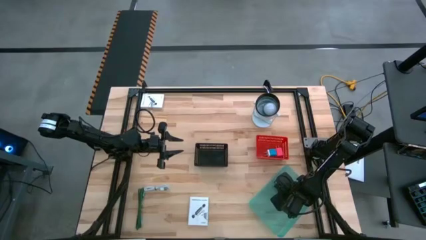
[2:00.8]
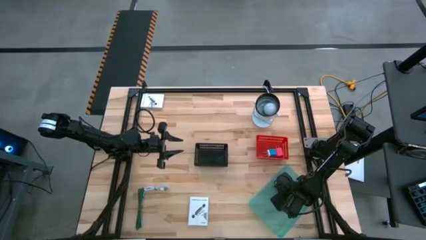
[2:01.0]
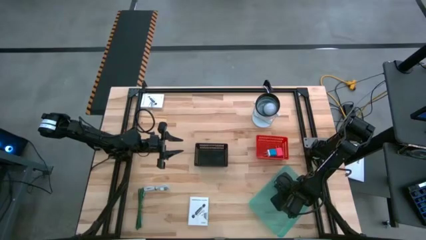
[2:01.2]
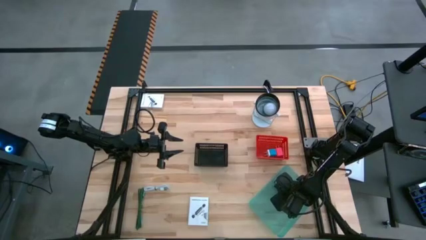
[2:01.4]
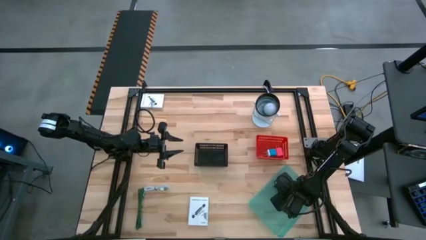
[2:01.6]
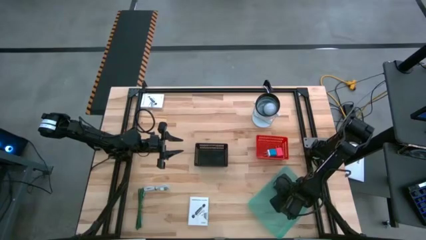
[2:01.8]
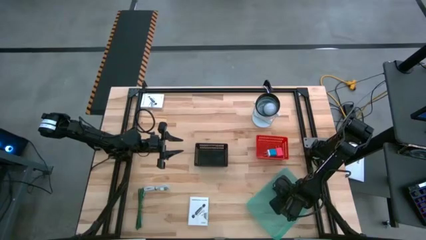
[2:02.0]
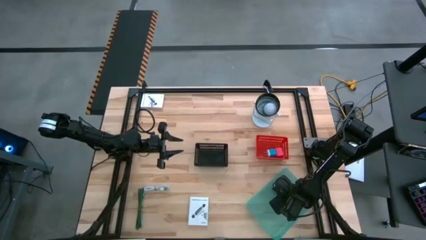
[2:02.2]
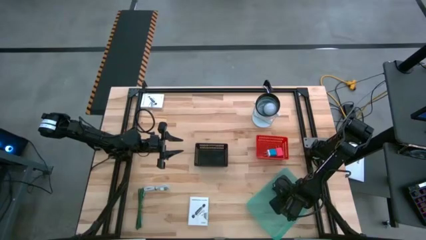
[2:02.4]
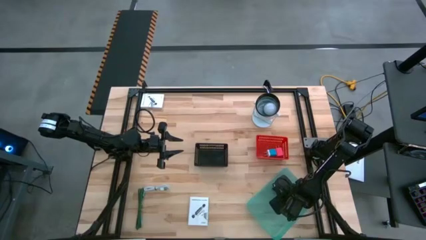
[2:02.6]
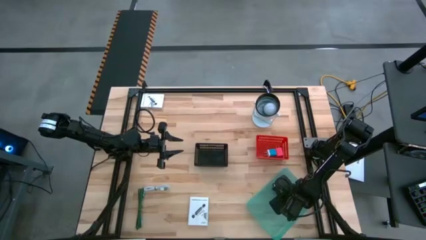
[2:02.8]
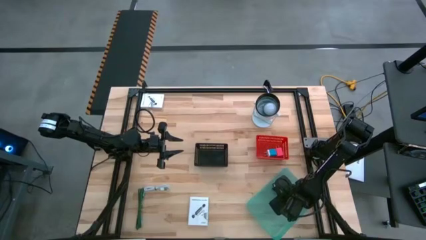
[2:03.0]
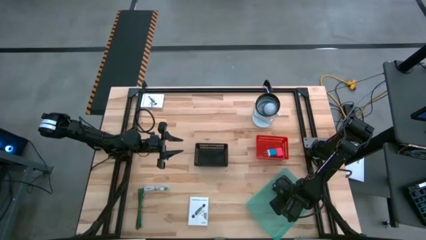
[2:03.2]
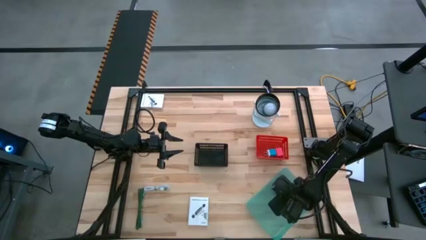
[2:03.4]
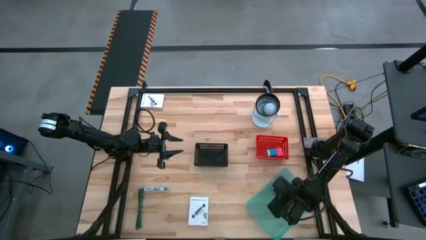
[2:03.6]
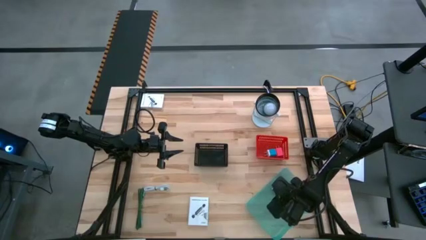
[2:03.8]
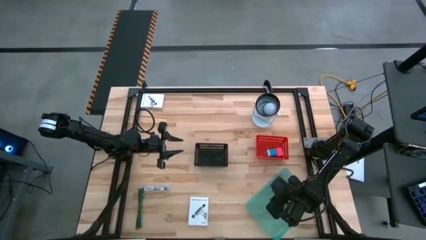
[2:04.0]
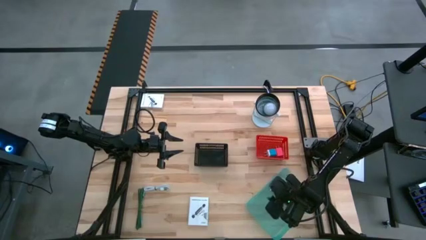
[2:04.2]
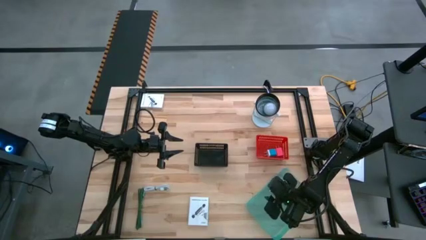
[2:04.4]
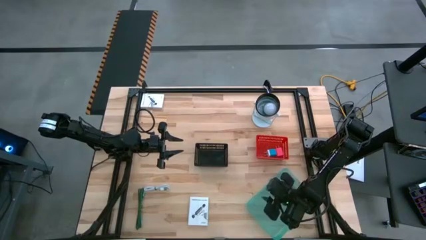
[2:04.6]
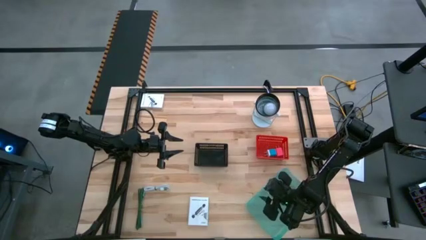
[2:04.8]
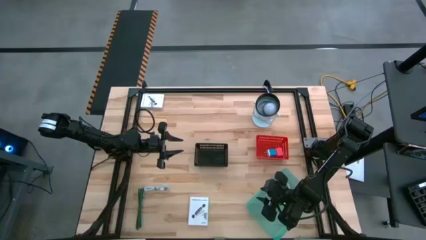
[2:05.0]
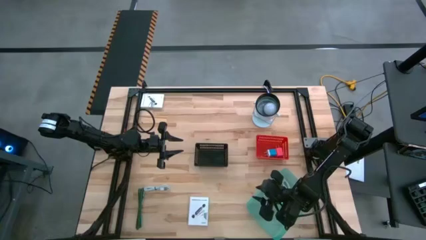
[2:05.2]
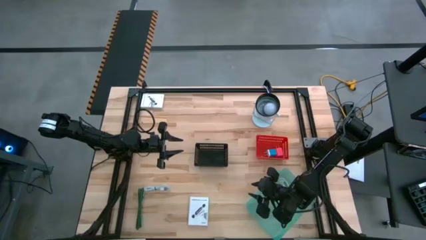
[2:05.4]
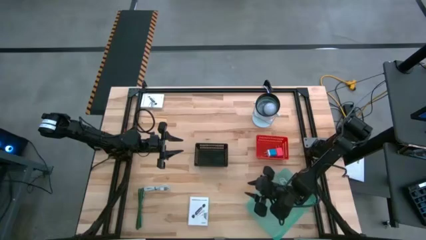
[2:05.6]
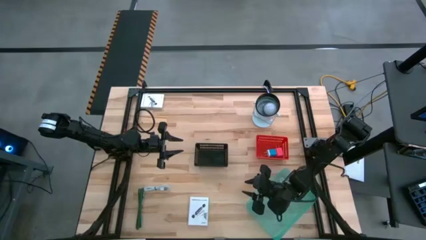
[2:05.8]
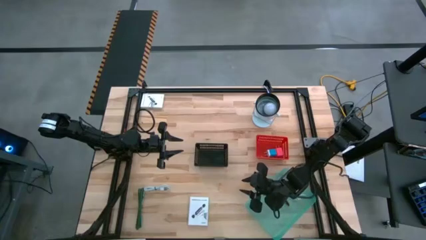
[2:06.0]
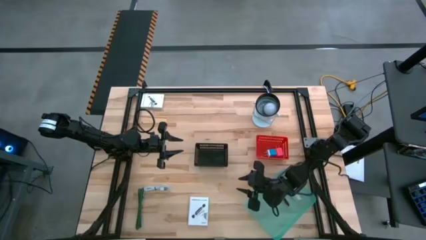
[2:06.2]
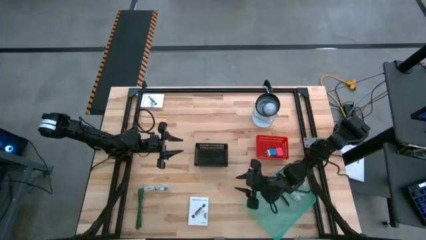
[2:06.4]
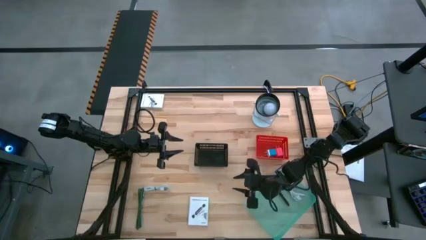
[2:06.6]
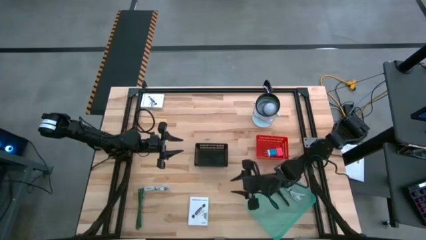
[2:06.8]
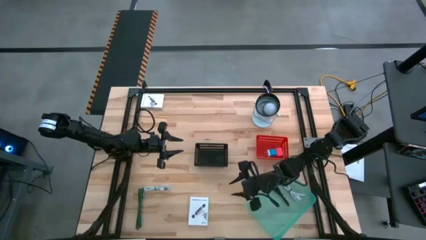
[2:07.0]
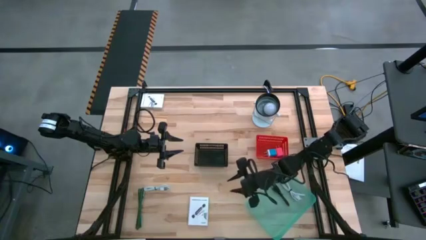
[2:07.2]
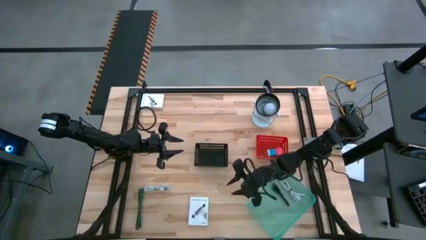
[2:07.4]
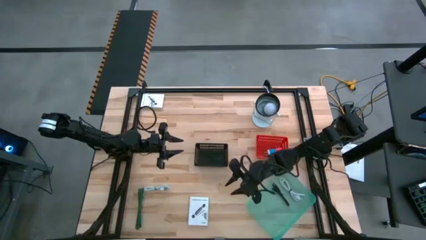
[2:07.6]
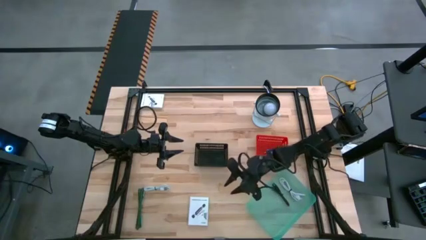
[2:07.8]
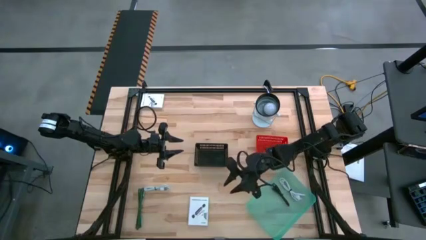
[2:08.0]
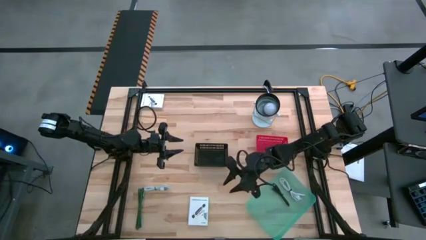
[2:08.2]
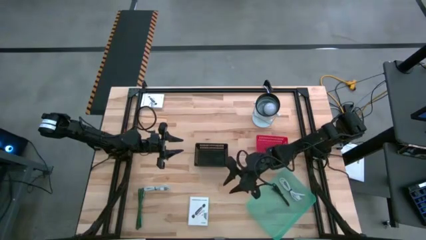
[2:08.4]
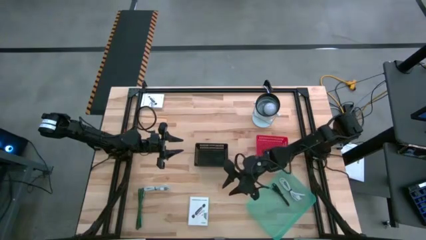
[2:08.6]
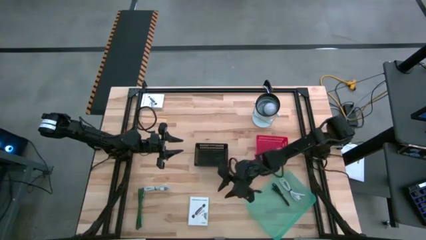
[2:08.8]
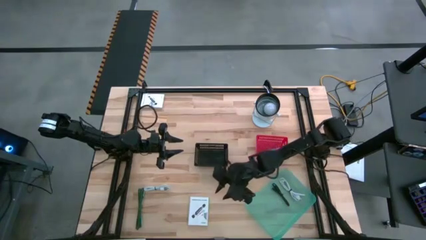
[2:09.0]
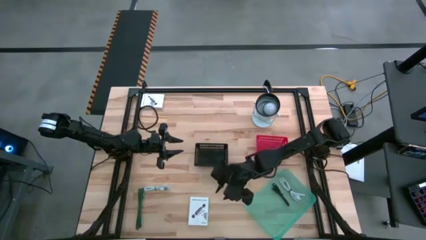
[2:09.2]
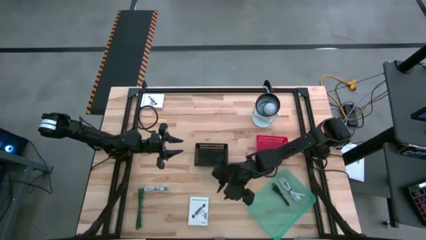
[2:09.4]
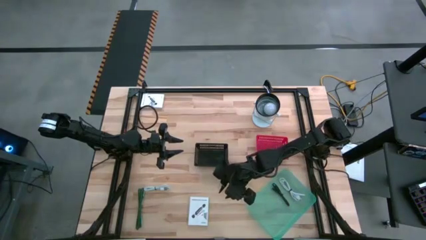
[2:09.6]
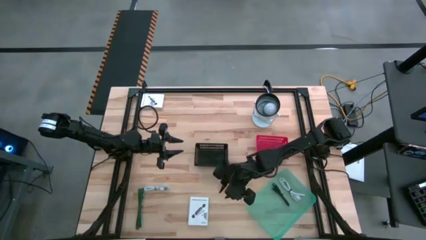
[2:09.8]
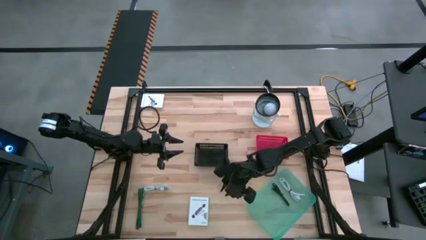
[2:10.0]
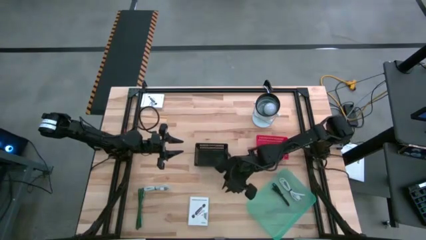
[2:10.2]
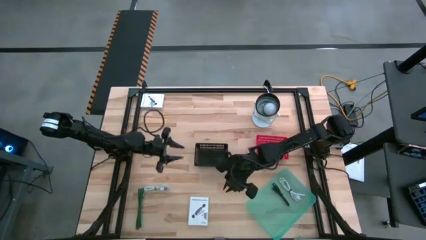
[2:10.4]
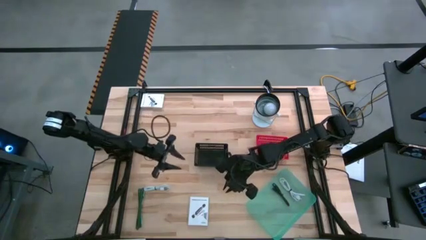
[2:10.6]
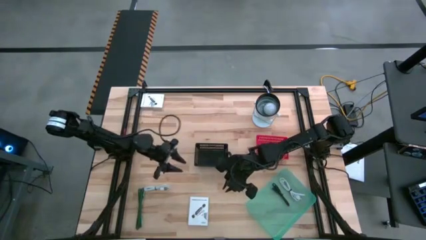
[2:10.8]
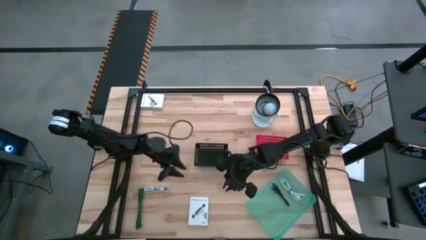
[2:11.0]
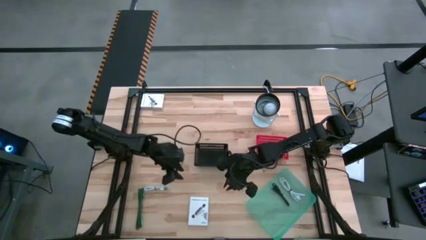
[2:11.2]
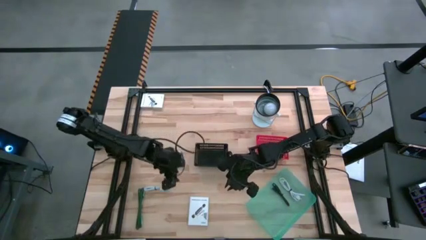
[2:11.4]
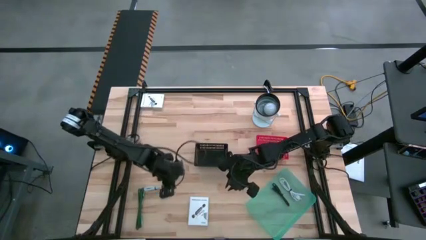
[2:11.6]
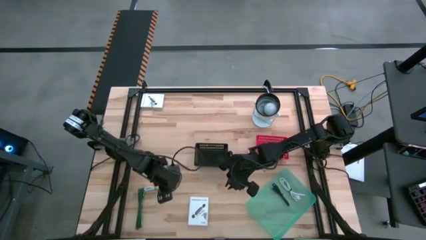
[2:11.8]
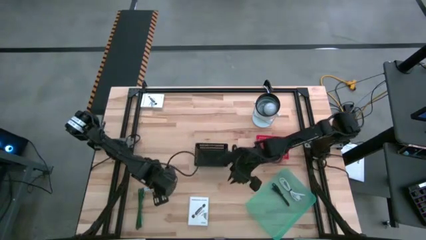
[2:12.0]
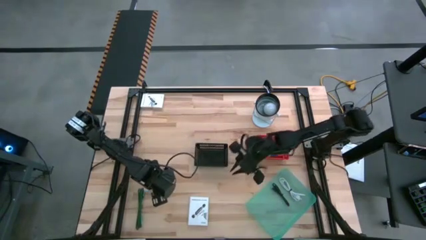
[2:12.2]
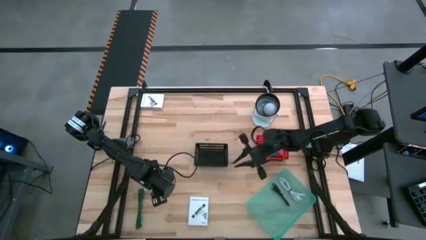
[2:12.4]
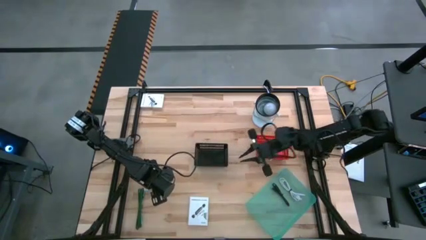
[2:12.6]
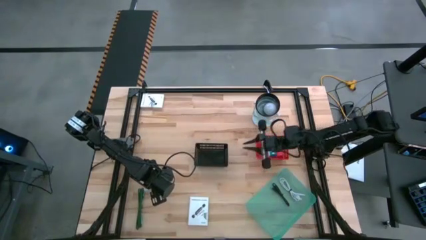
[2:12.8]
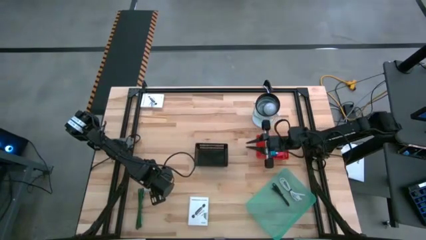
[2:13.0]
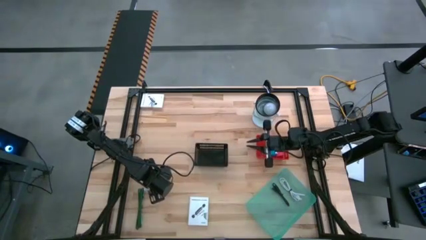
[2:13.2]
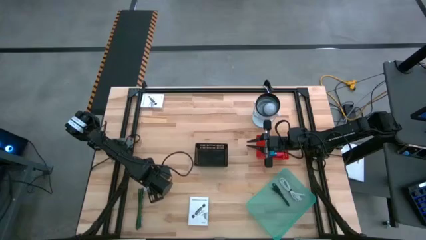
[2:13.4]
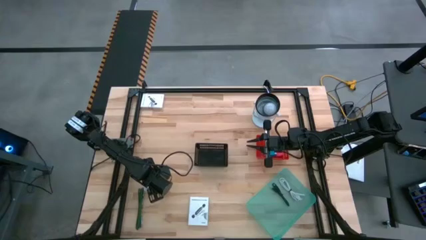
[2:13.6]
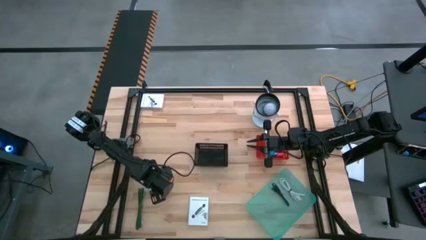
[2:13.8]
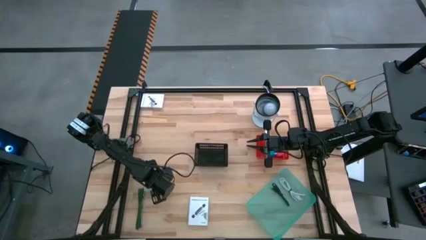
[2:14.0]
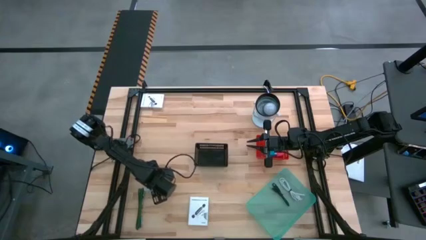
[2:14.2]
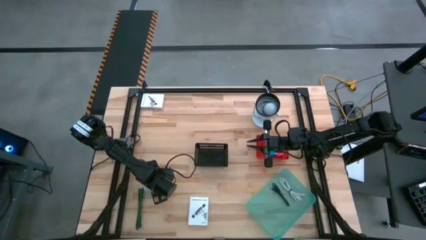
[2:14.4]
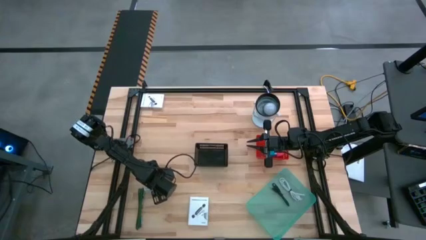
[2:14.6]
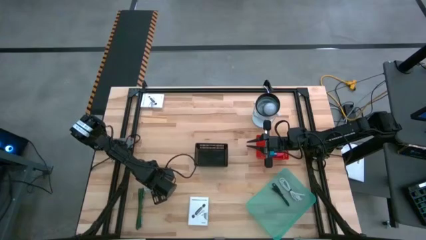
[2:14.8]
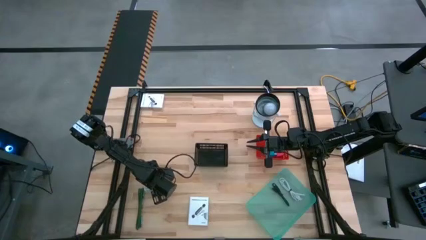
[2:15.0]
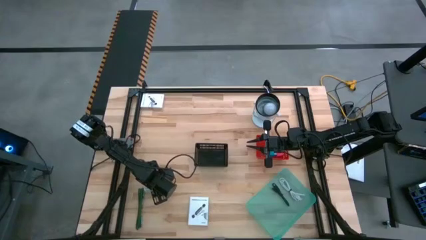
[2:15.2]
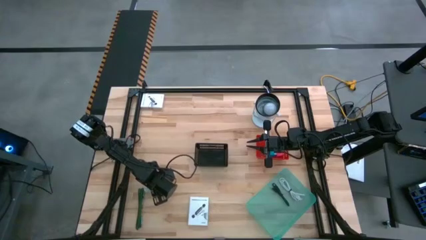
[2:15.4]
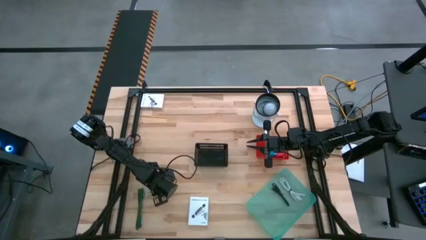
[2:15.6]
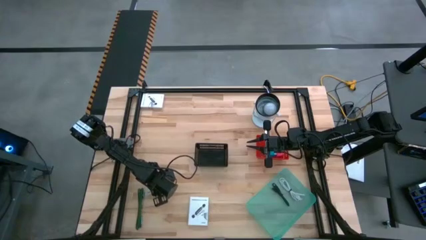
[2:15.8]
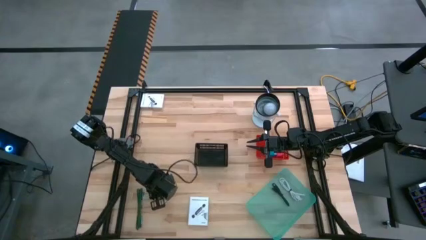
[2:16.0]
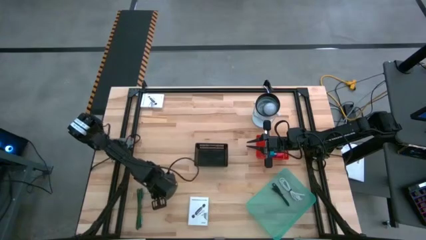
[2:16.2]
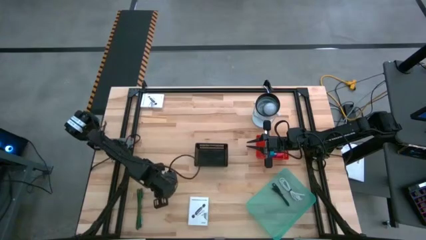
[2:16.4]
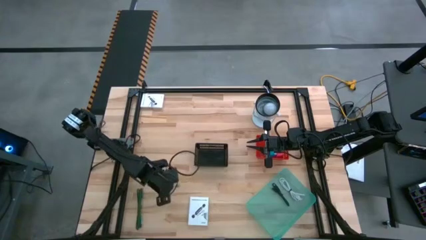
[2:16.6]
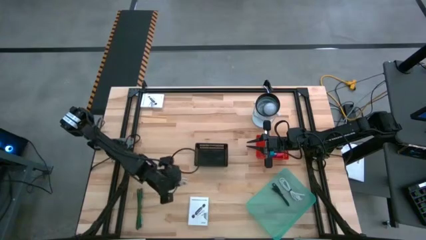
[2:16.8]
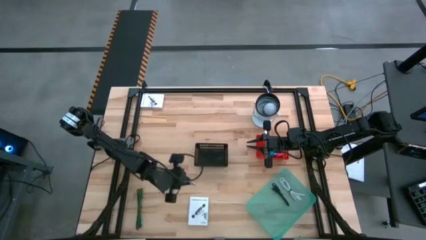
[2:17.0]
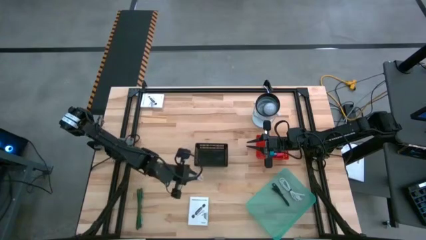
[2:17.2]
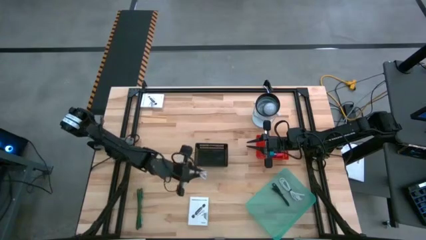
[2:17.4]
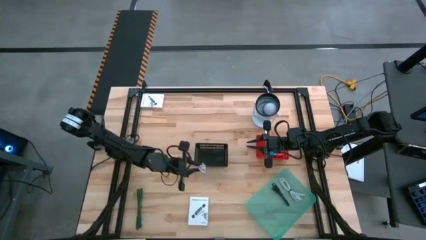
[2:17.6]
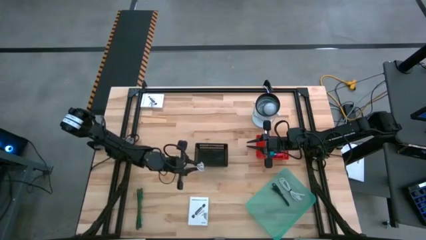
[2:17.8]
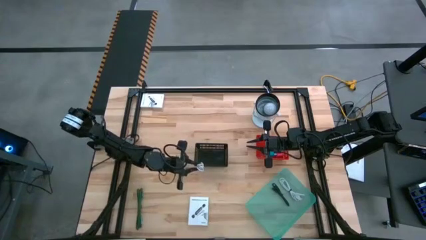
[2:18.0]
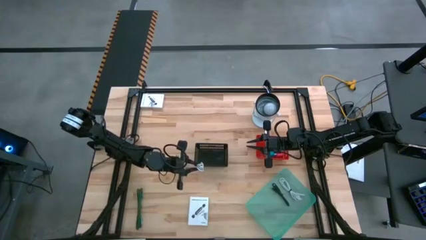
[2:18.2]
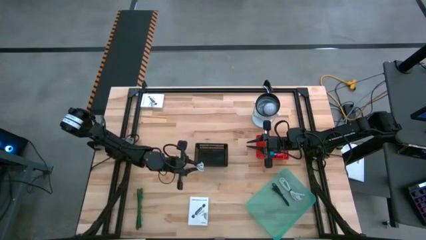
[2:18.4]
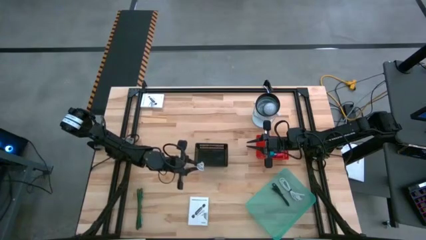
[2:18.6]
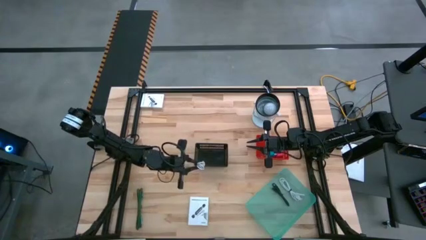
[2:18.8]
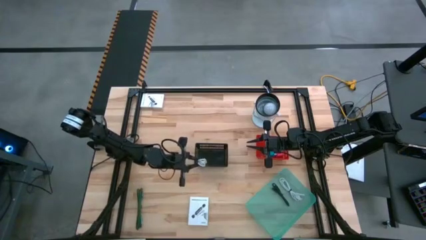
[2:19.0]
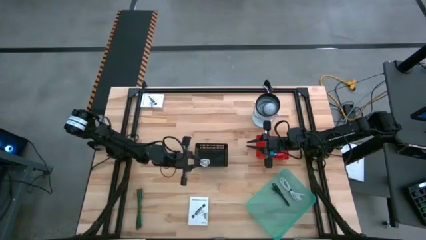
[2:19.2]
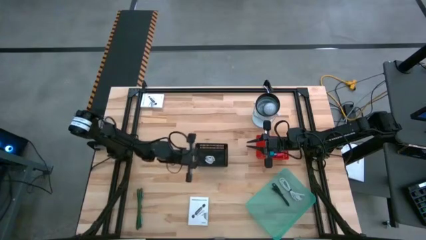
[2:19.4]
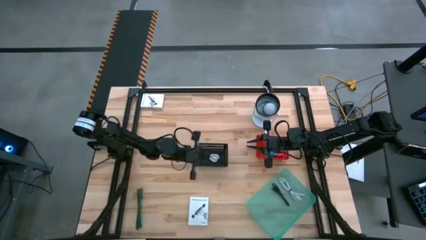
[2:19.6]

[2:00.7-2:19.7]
Task: Pick and place items into bin
Put the white charger cable into the blue bin
